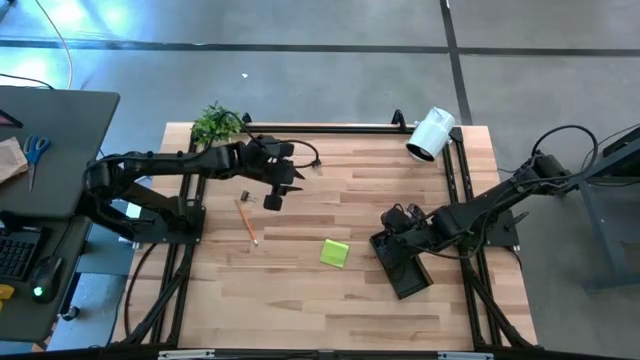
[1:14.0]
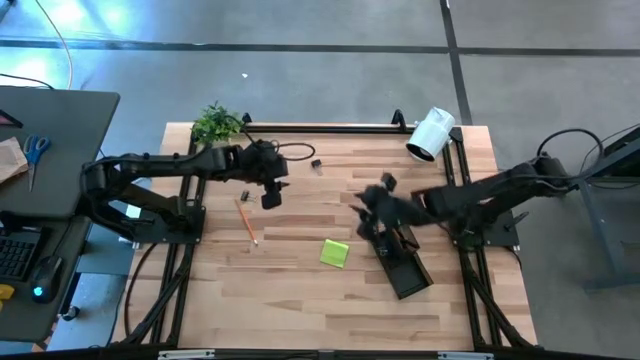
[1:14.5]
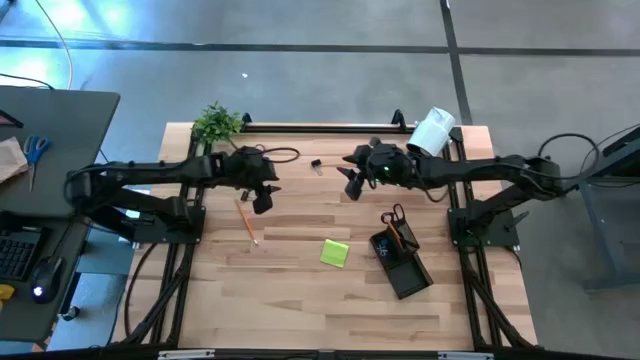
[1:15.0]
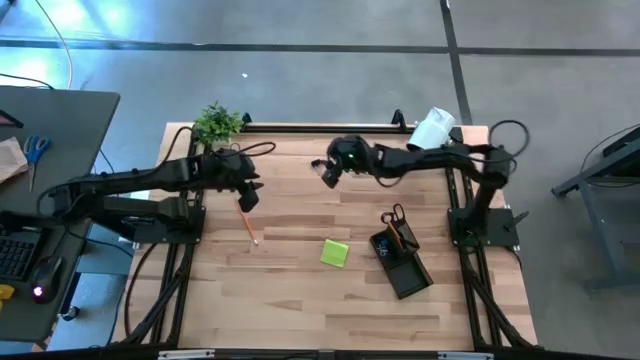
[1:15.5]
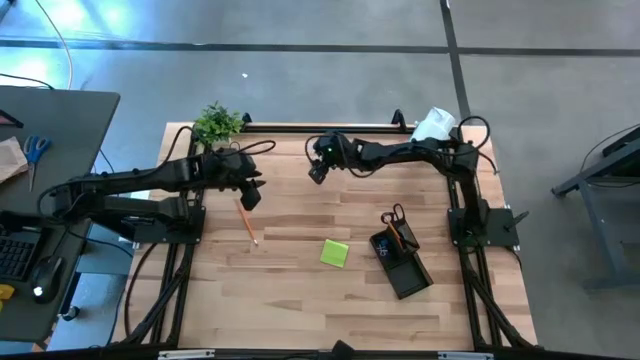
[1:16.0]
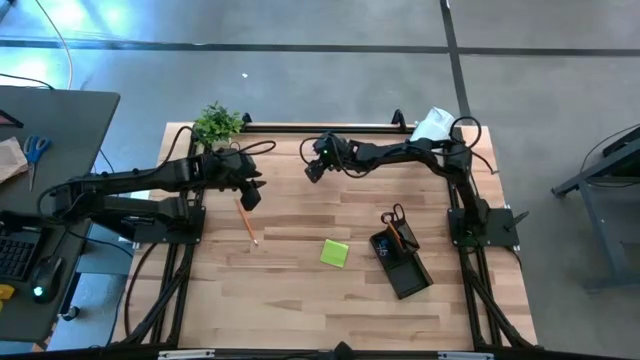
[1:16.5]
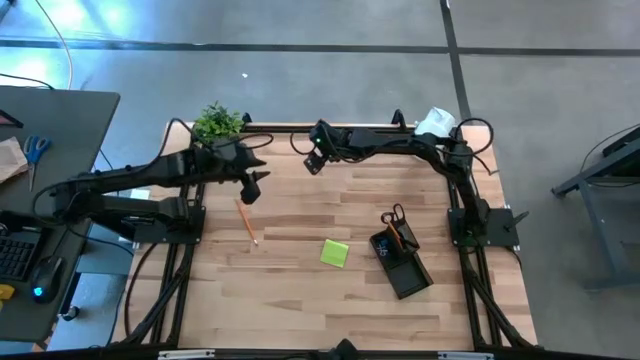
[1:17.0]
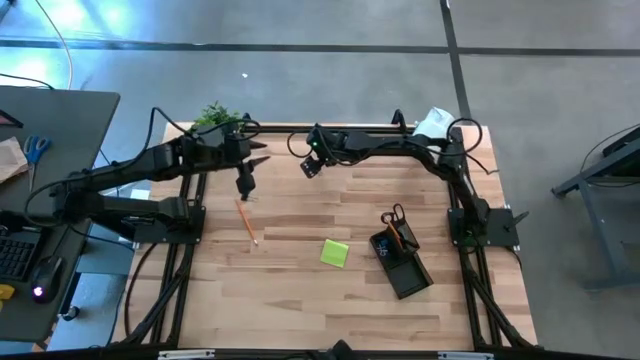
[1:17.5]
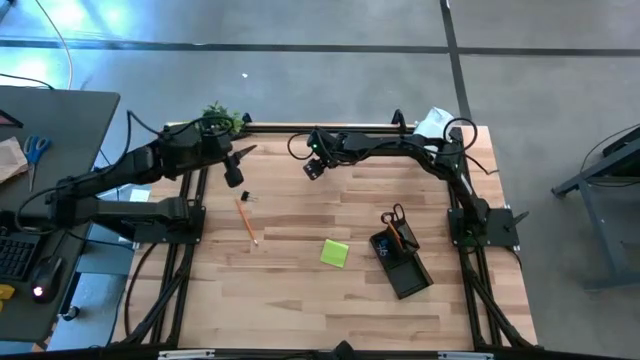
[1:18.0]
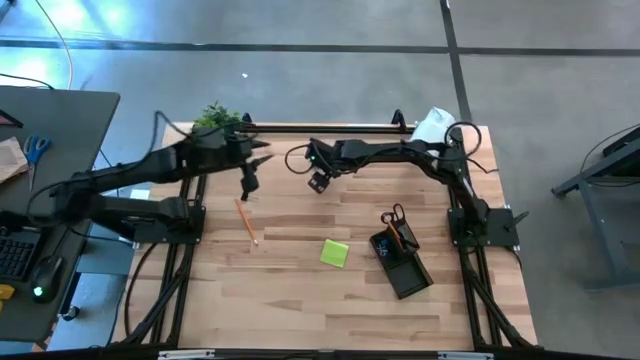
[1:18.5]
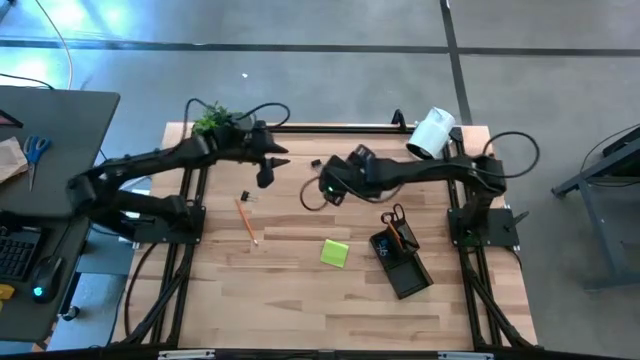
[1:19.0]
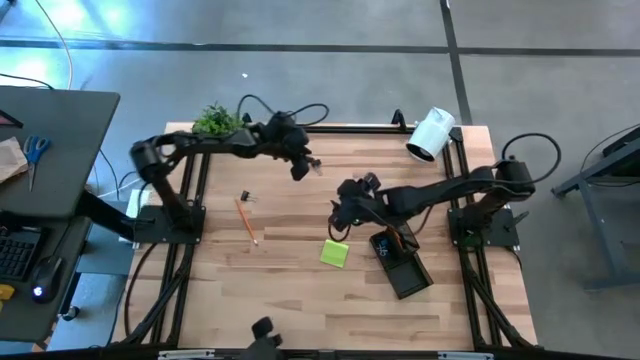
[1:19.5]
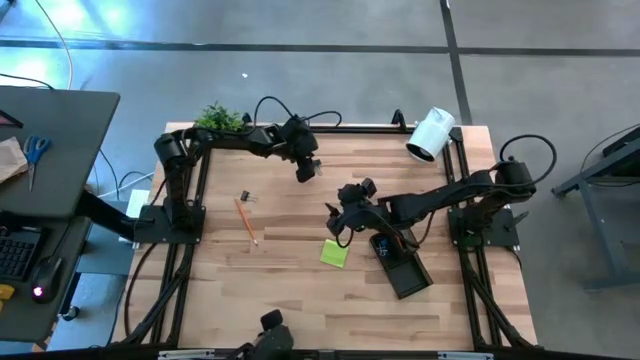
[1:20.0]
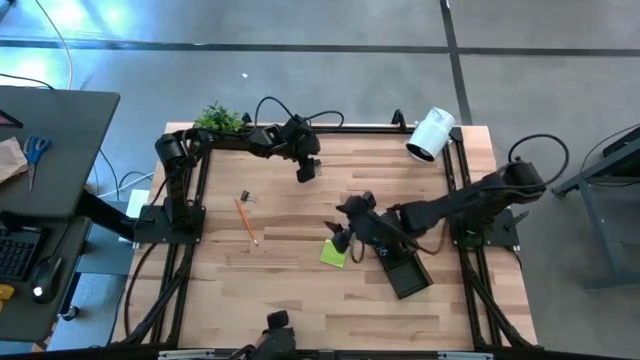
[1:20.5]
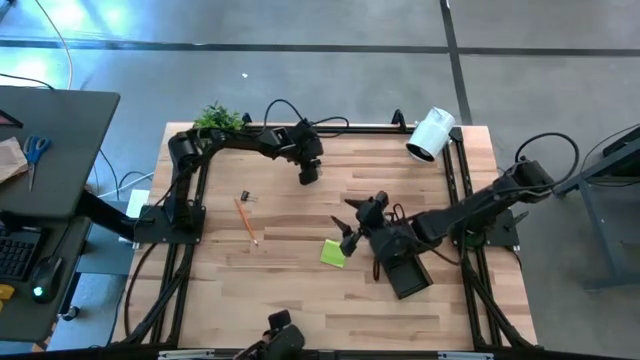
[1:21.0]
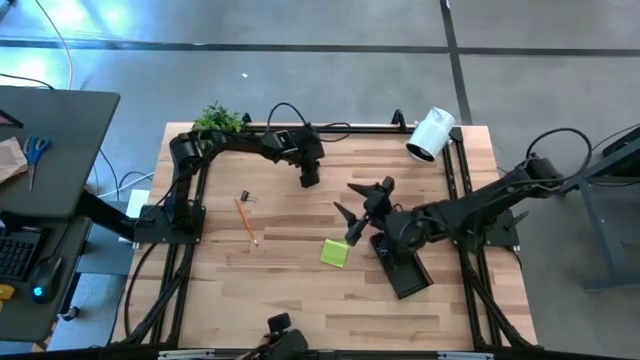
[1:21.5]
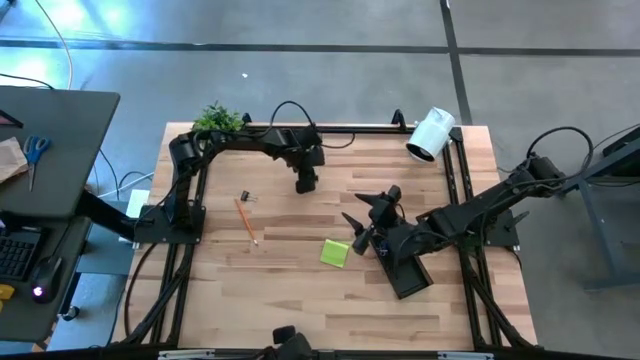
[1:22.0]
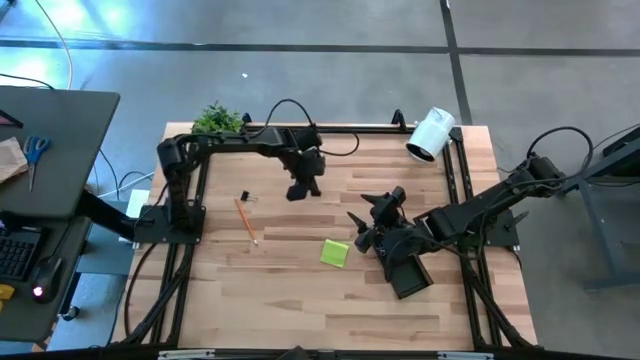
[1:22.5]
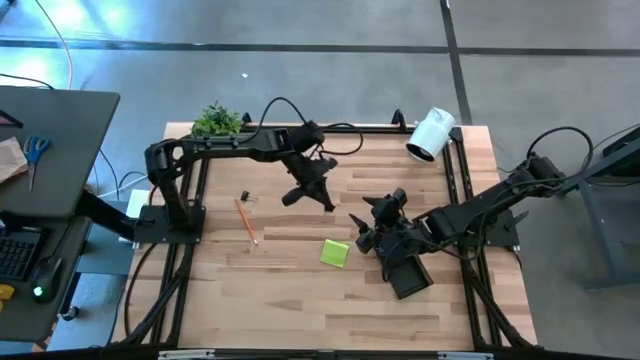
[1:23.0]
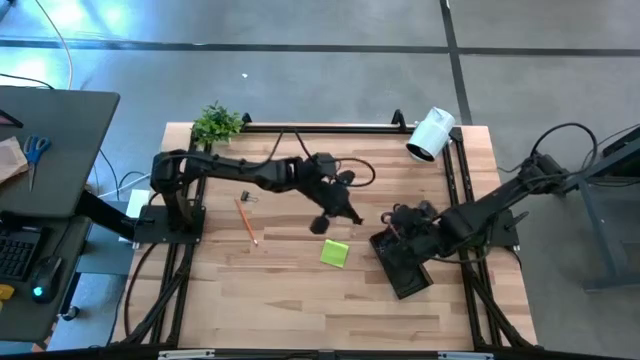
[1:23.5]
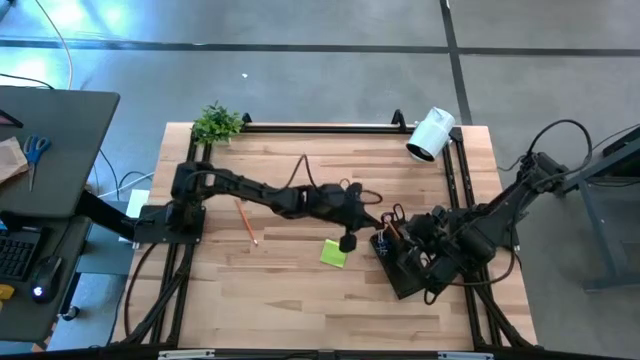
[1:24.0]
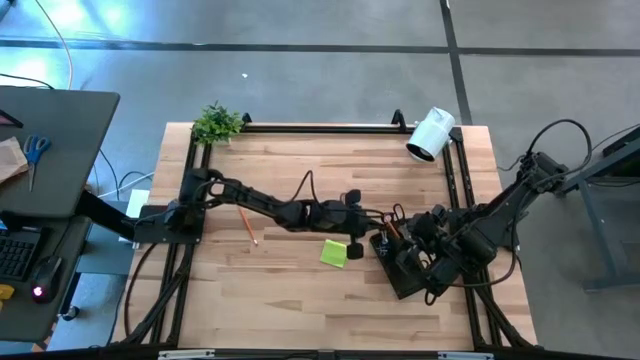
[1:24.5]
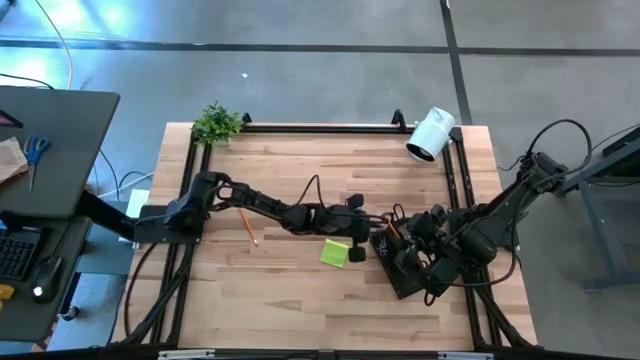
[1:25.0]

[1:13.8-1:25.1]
Task: Pick and place office supplies into organizer
Put the black binder clip into the black desk organizer

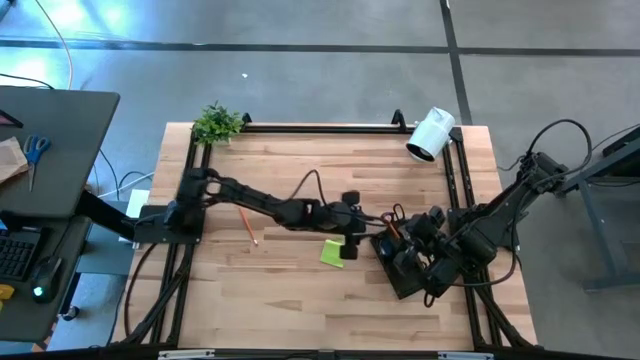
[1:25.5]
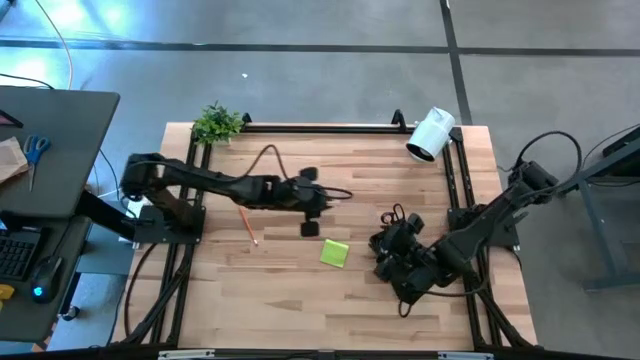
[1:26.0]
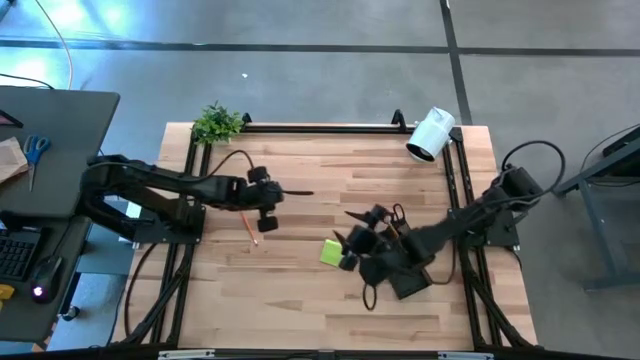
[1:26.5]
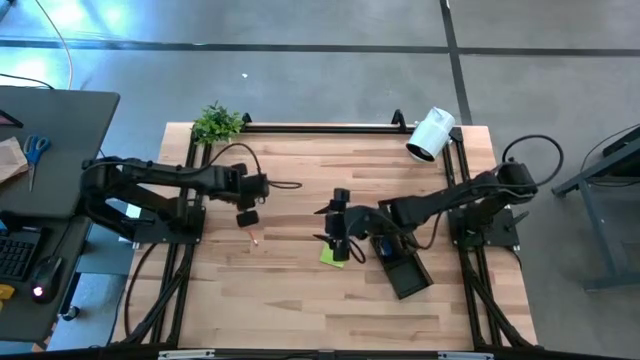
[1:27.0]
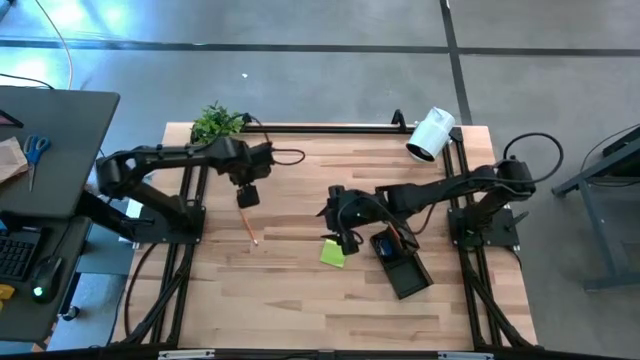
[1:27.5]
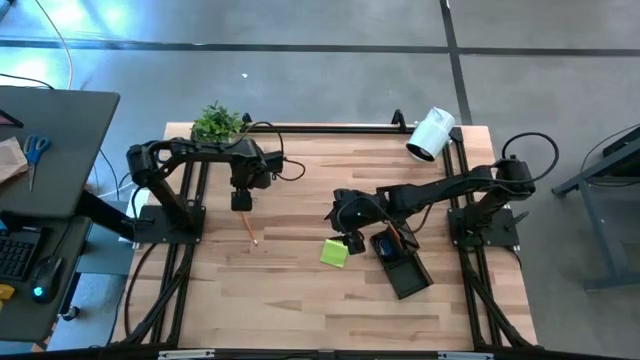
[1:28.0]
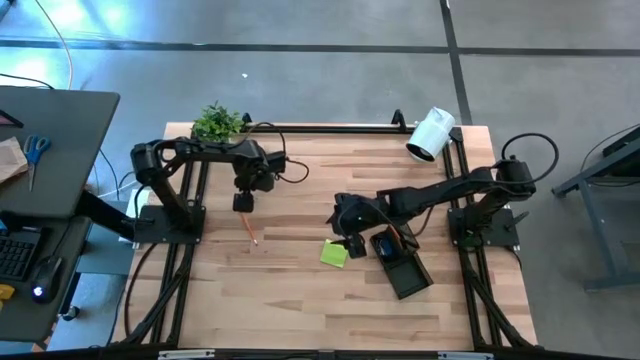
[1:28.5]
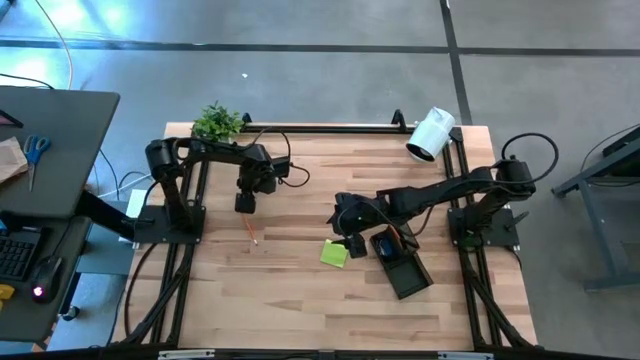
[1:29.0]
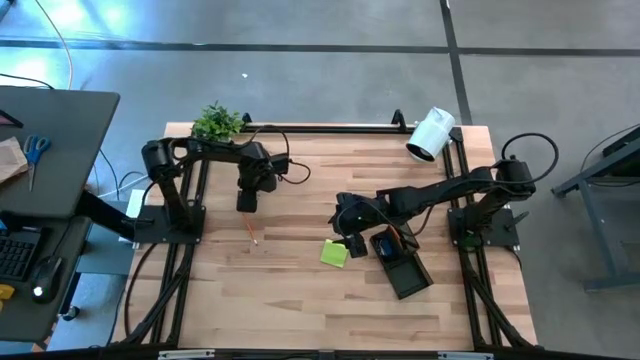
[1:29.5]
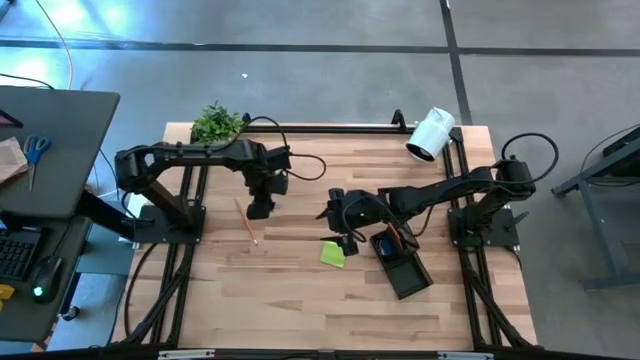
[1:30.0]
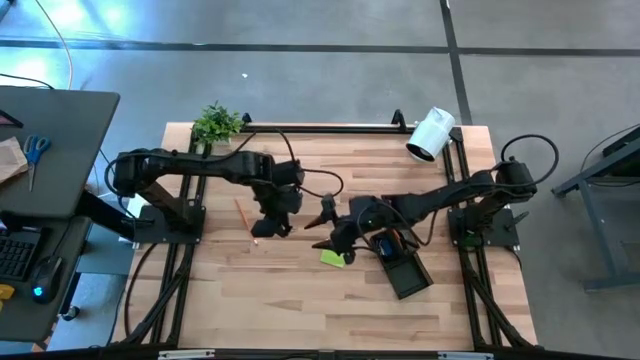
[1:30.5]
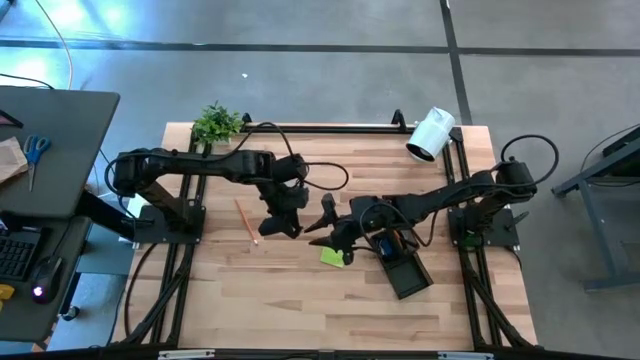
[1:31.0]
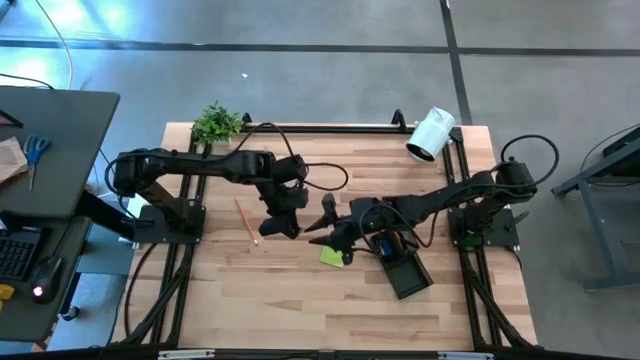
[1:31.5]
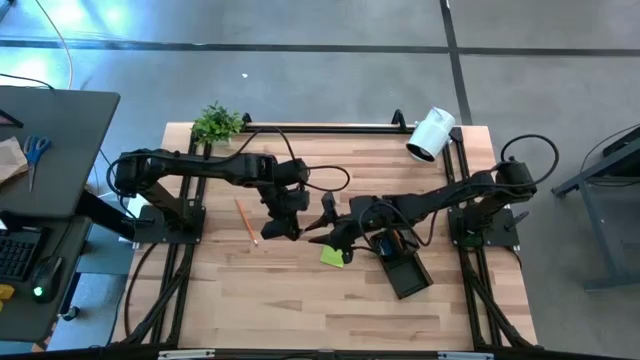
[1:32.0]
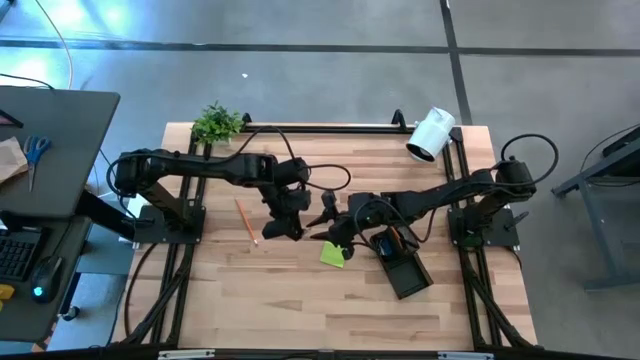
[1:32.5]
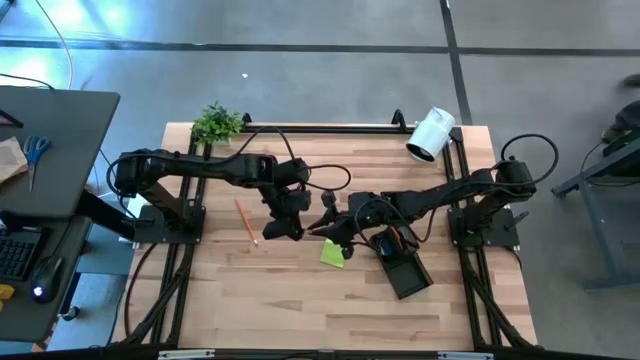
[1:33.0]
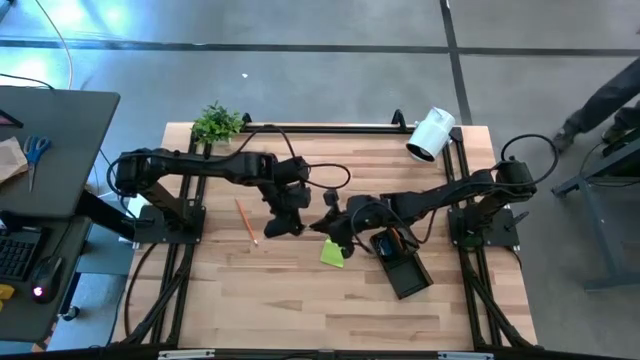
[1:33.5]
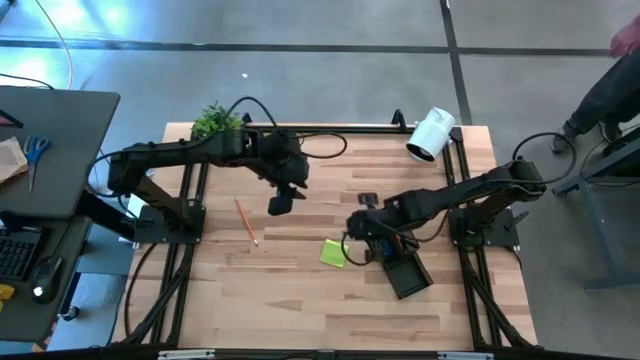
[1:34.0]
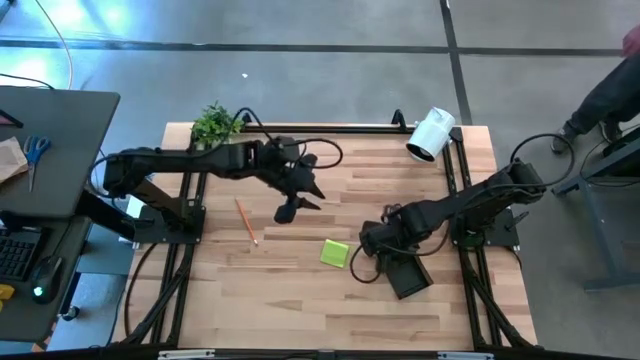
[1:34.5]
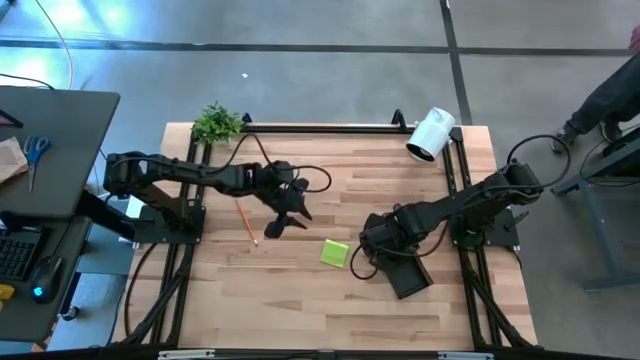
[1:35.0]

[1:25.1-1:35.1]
Put the black binder clip into the black desk organizer
